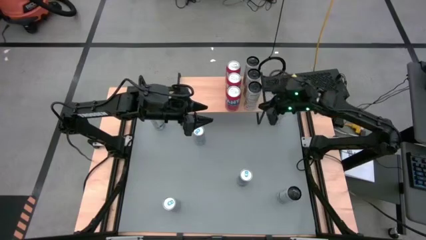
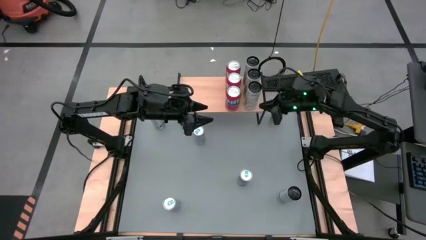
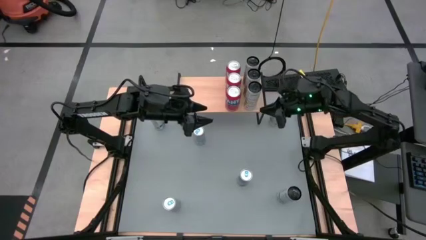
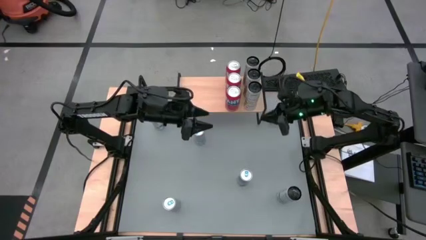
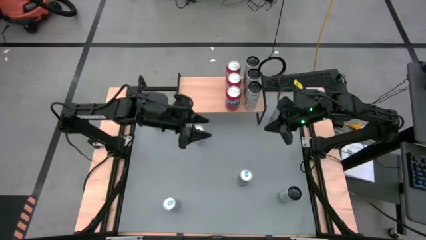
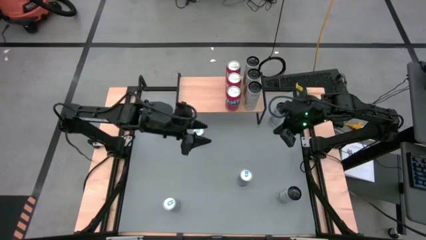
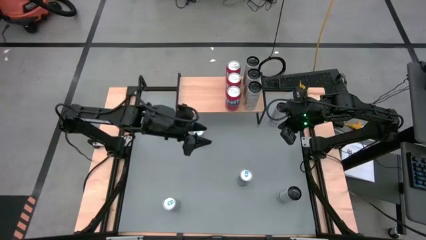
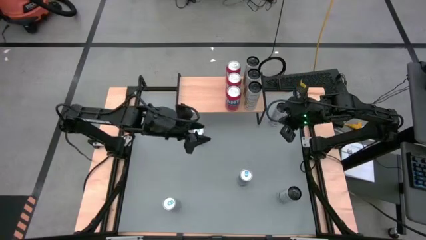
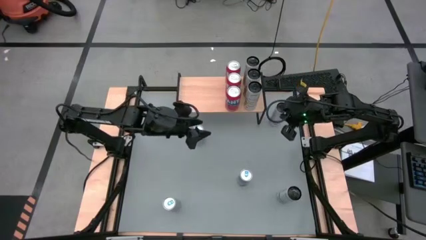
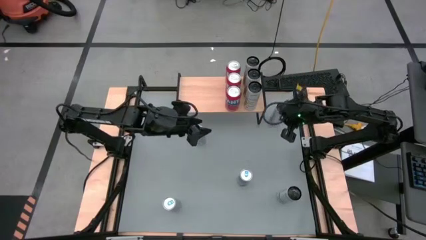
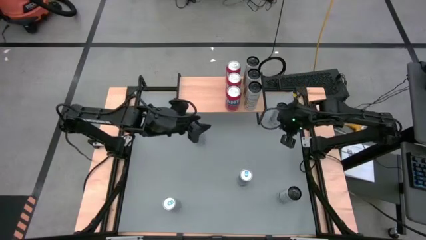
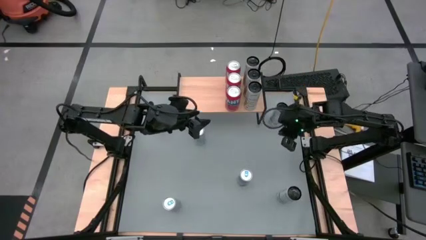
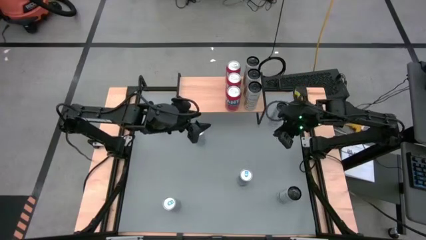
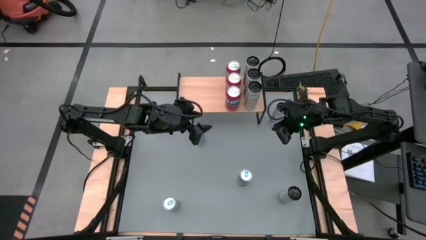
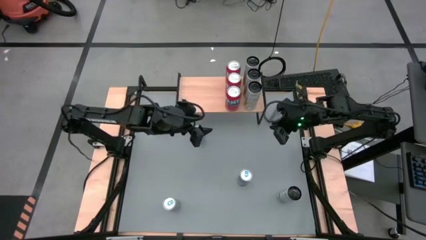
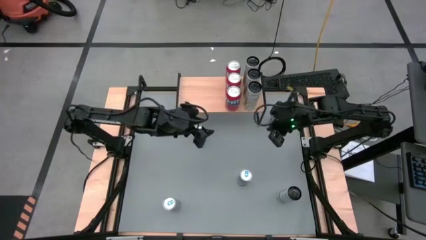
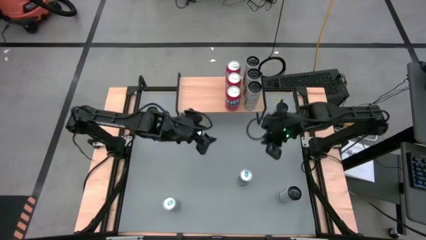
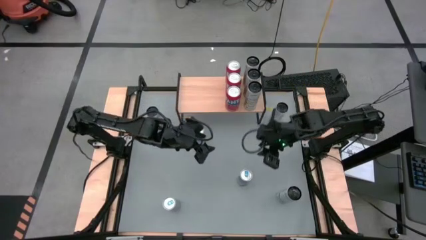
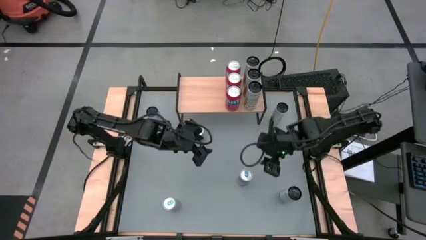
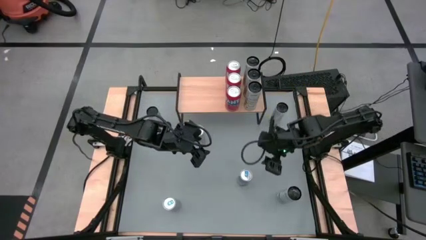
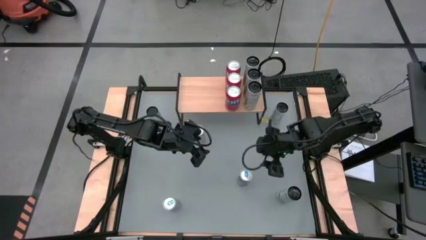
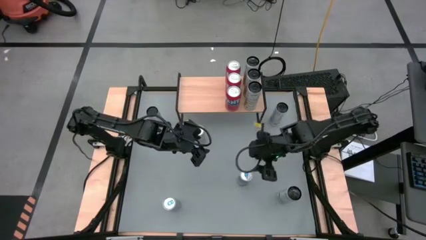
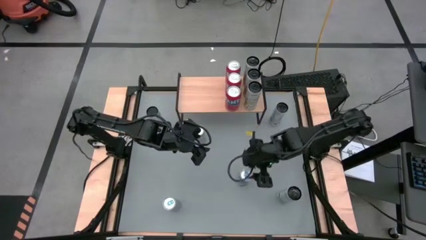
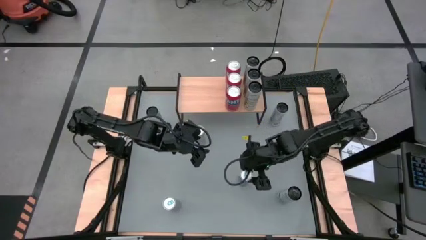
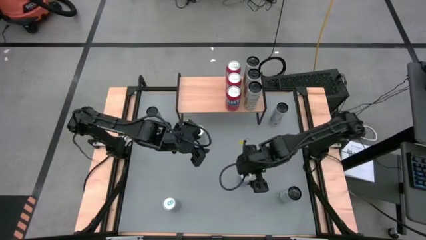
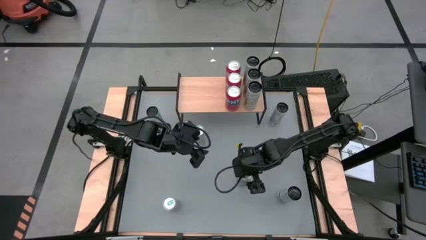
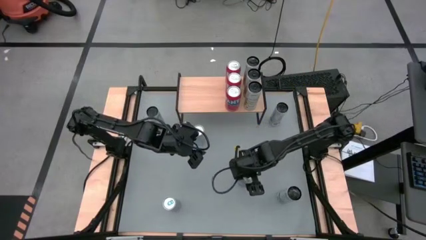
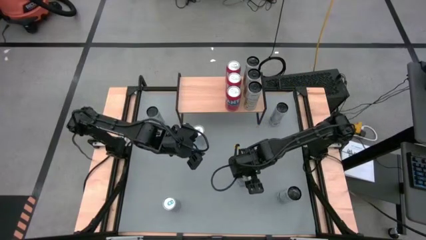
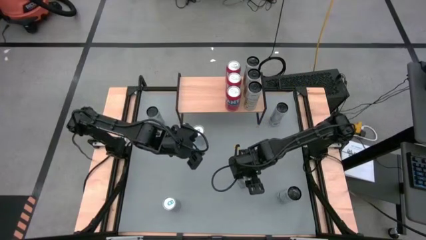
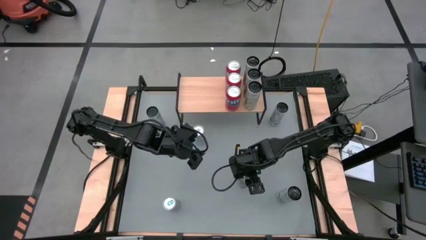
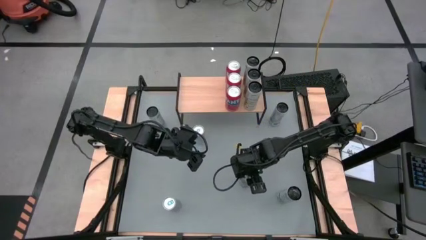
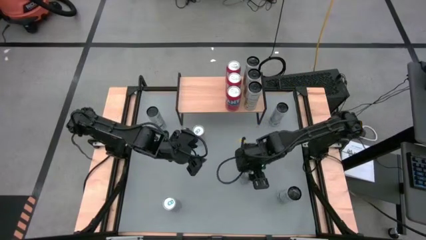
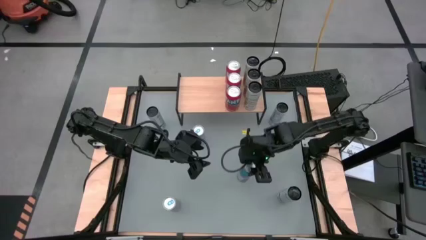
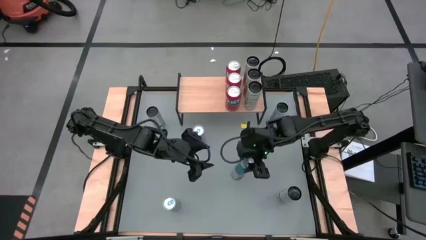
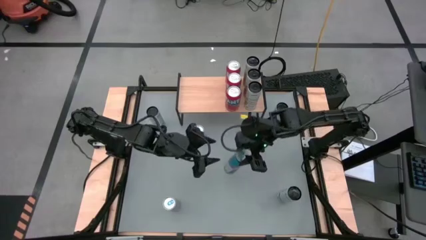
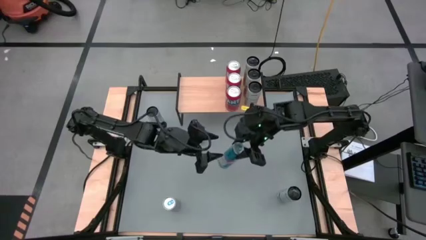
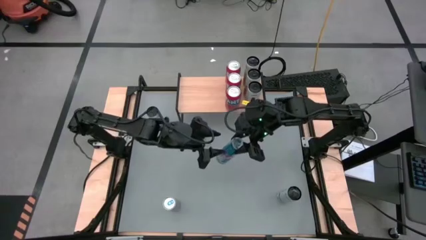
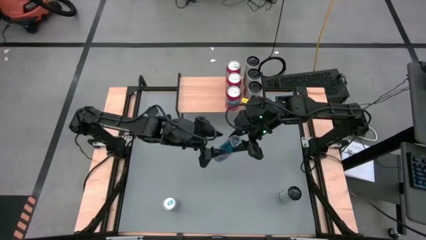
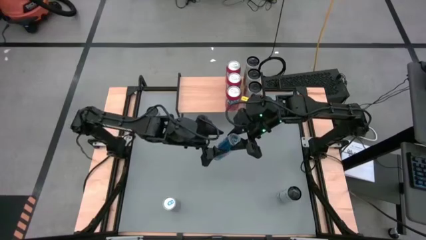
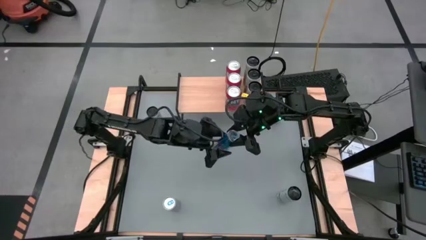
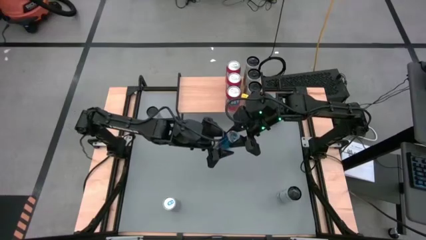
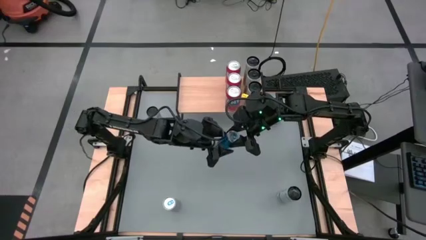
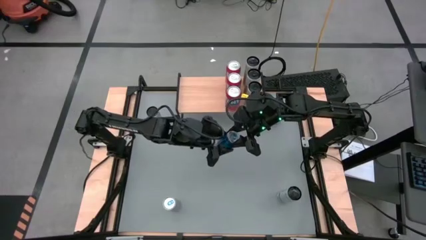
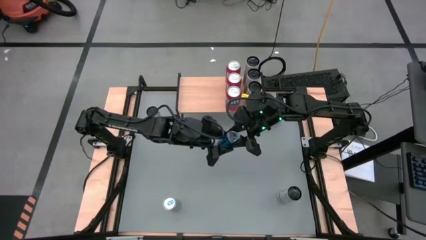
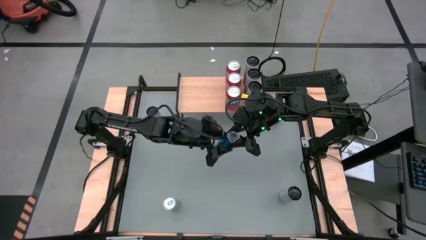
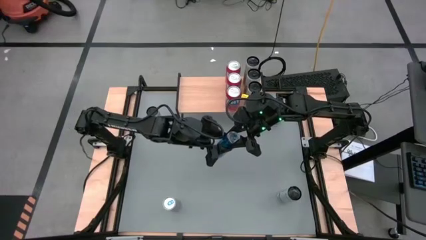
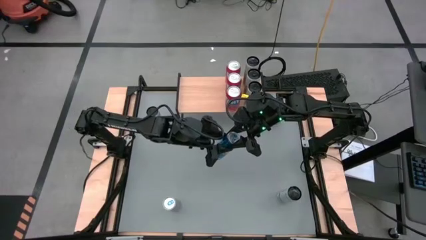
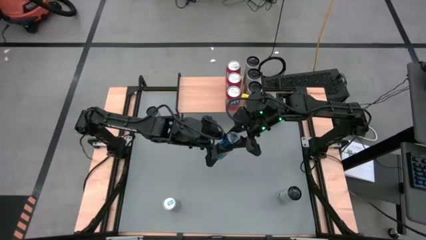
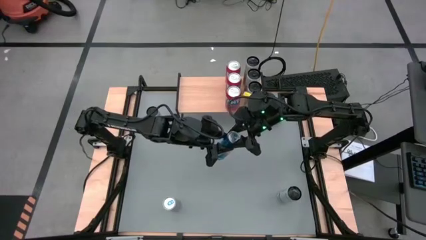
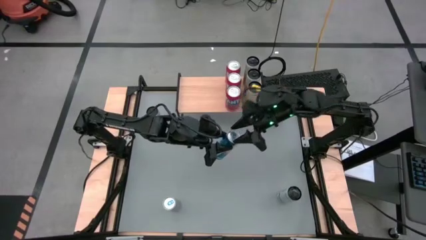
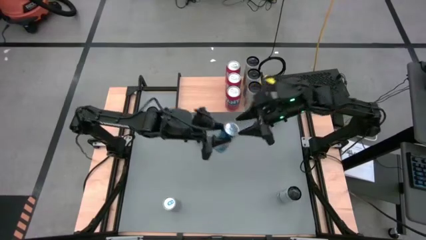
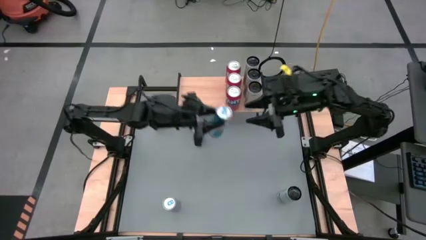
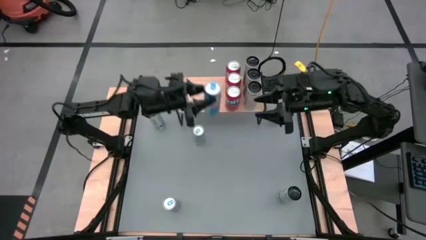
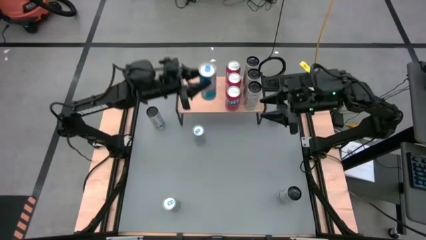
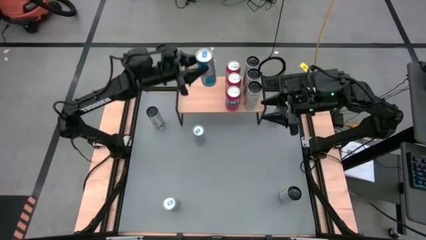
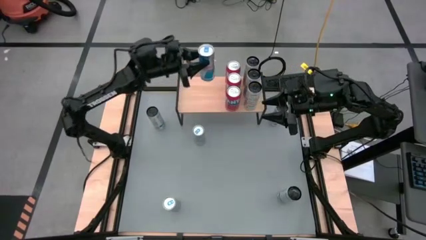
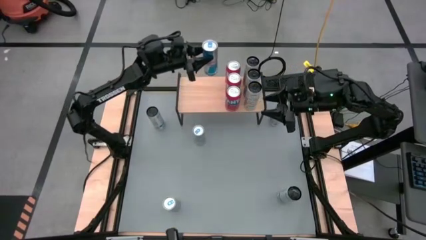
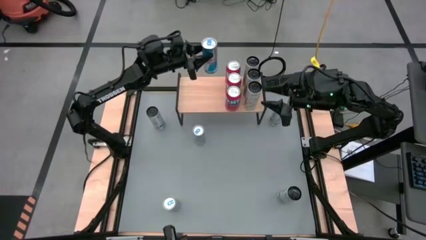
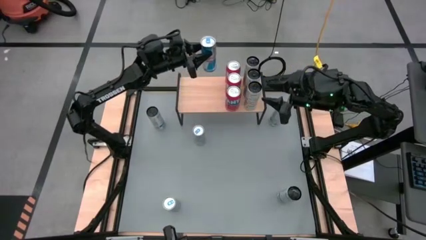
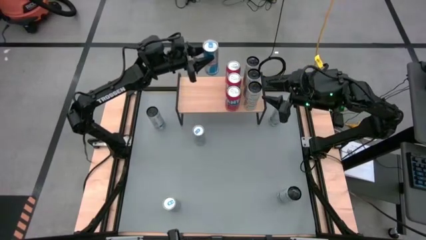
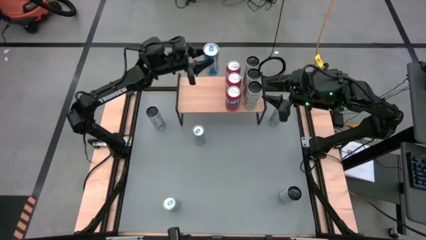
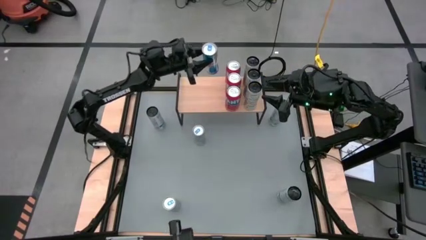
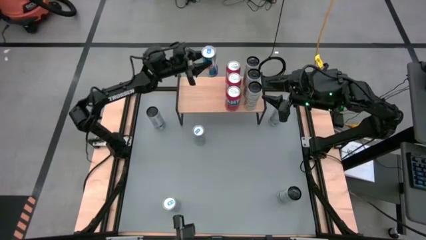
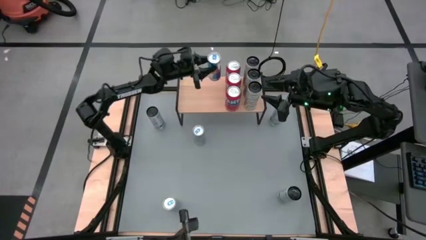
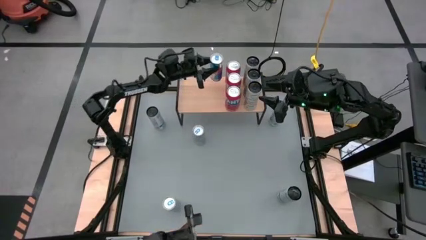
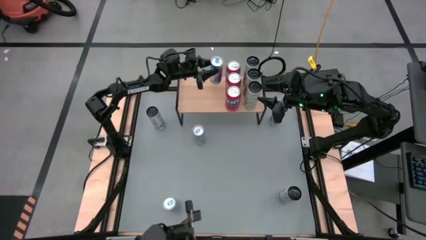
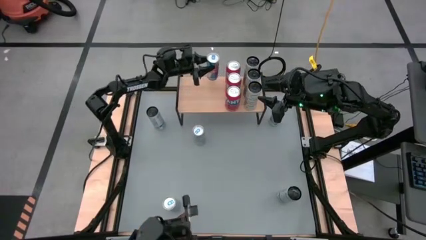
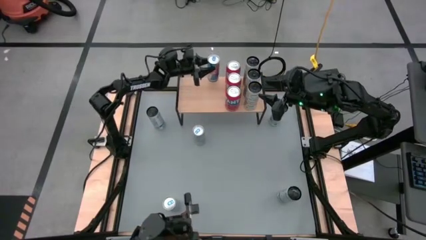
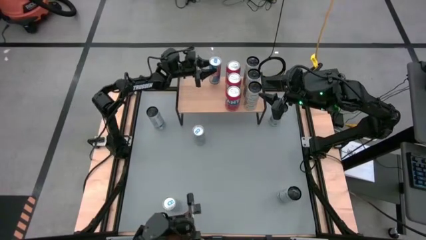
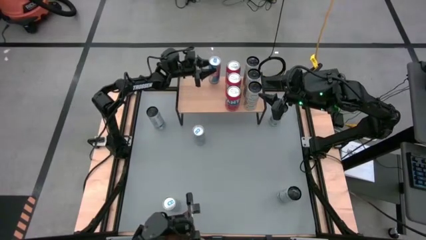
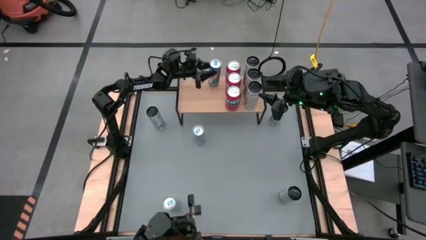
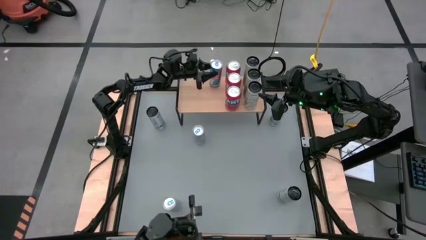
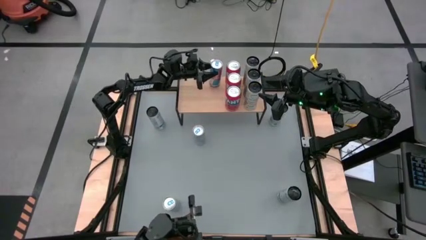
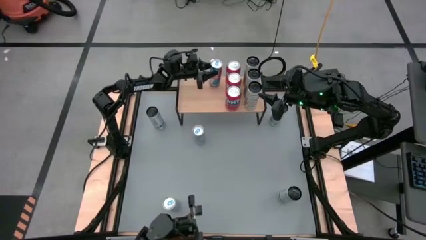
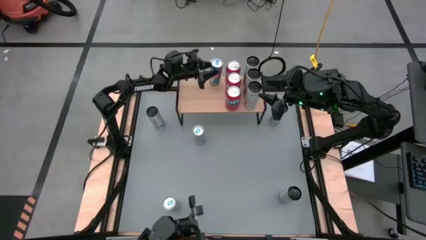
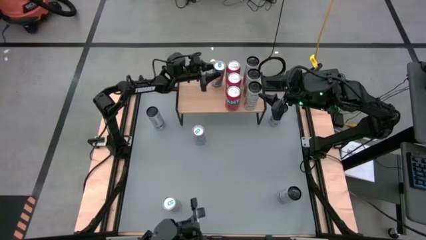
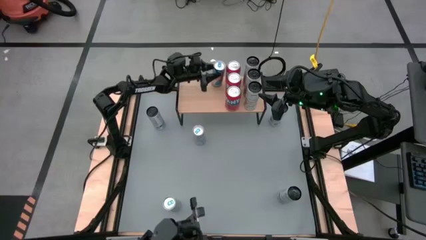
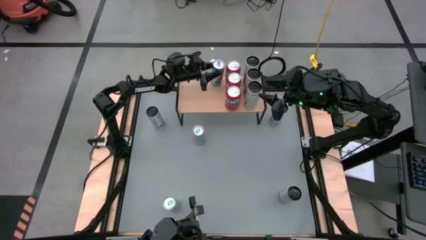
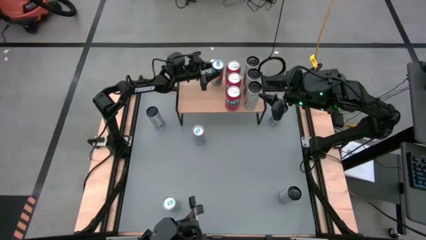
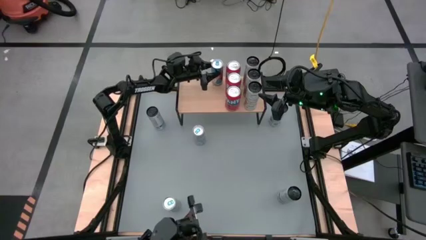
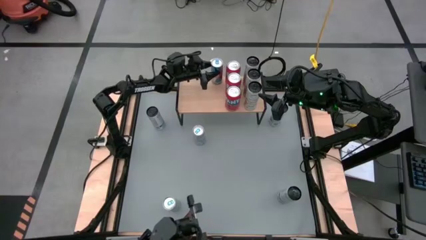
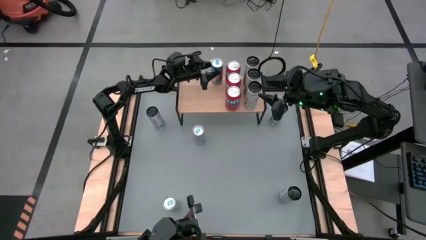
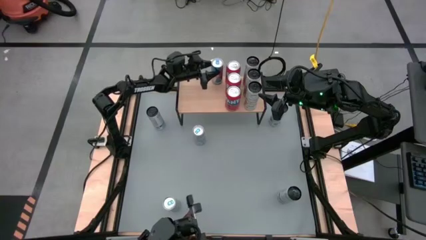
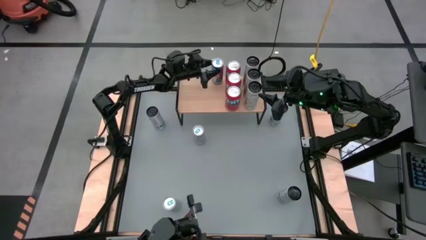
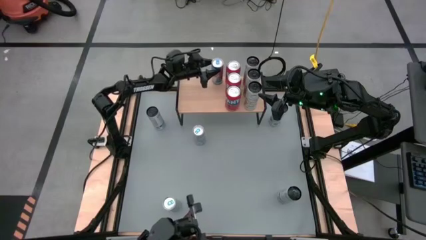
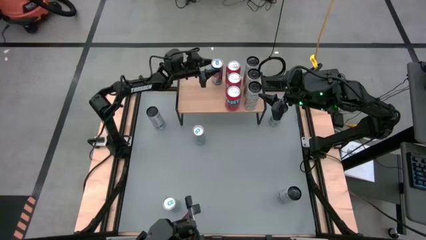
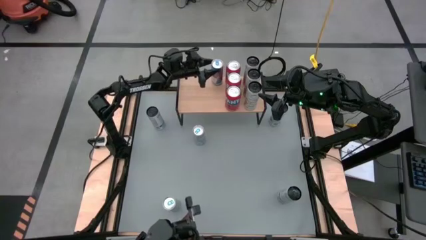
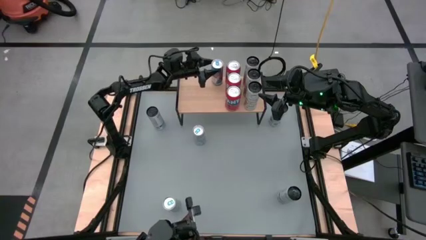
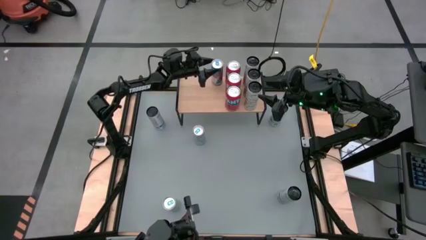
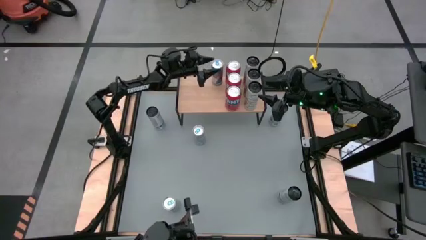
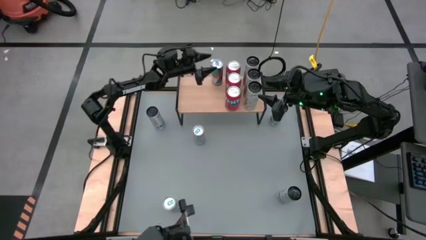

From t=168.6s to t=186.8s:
Task: Place canned beverage on shelf
Put the middle blue can on the shelf
